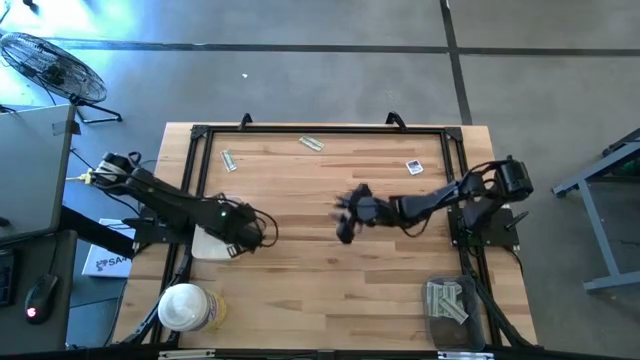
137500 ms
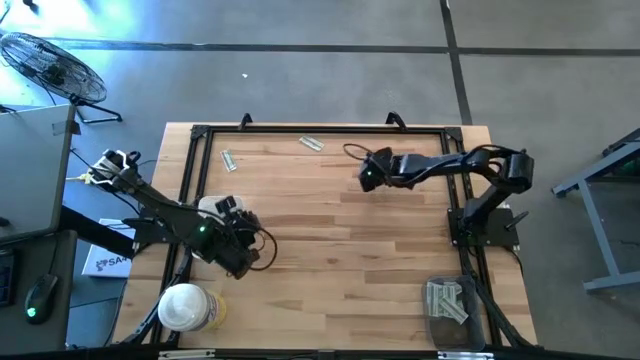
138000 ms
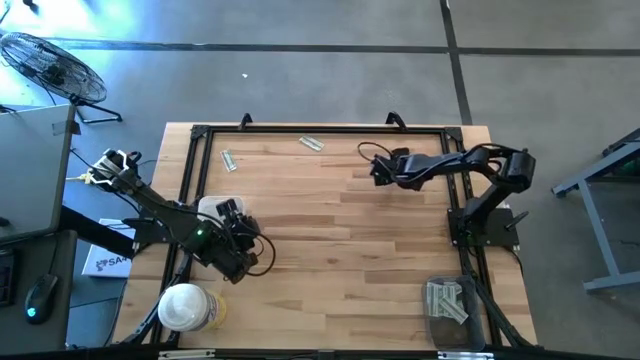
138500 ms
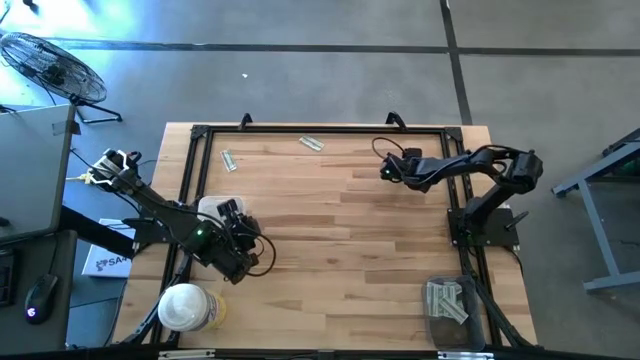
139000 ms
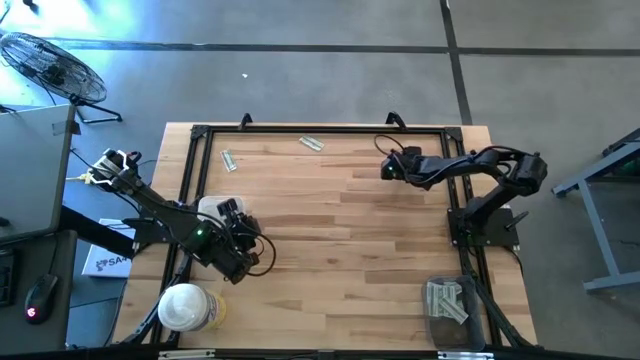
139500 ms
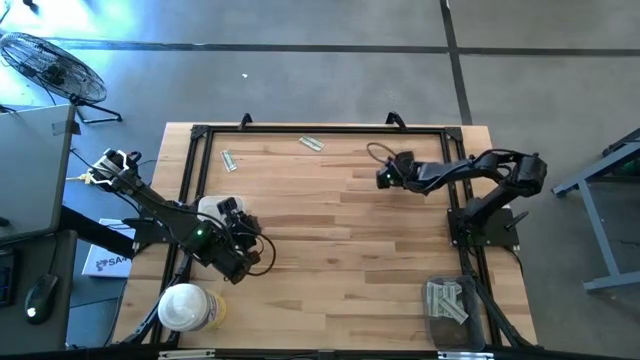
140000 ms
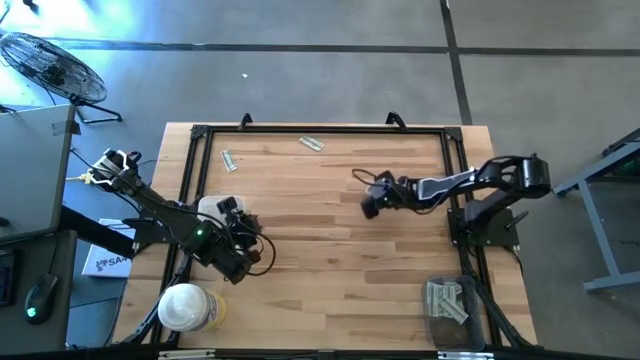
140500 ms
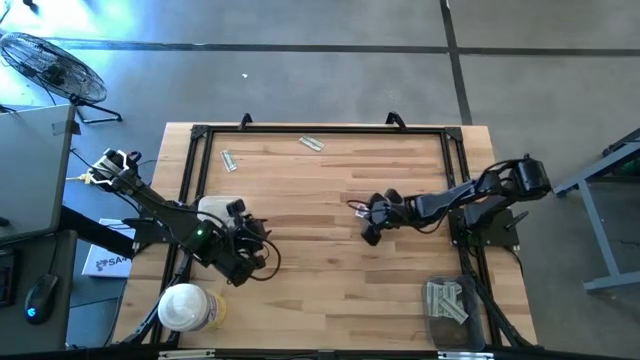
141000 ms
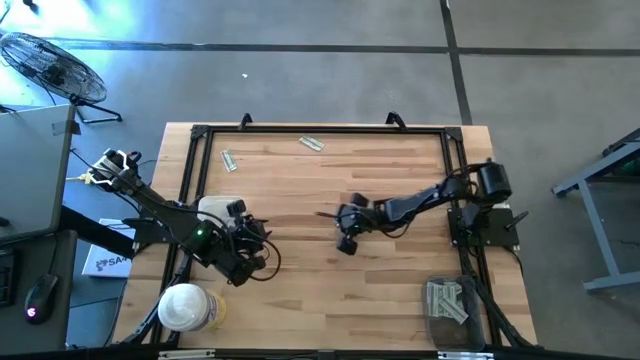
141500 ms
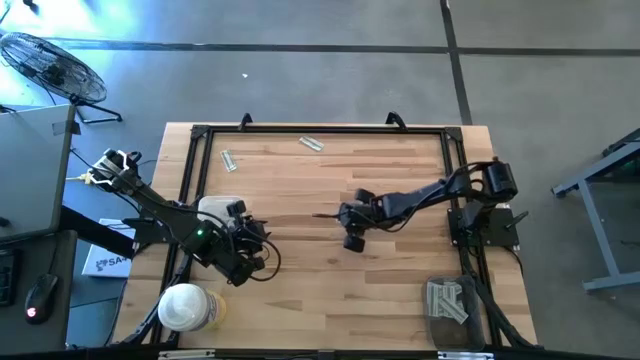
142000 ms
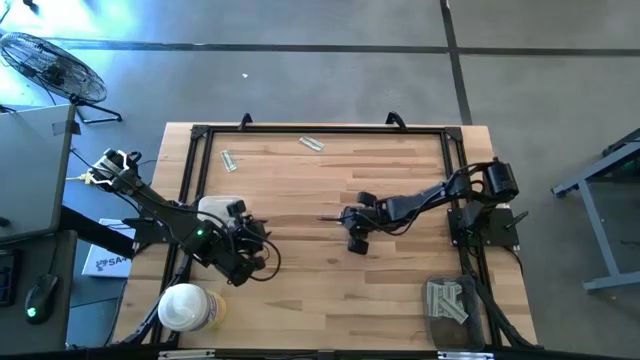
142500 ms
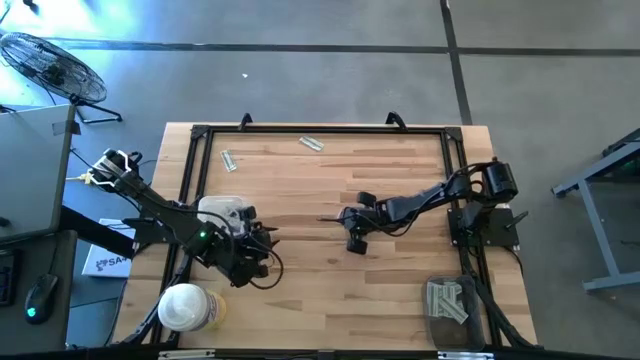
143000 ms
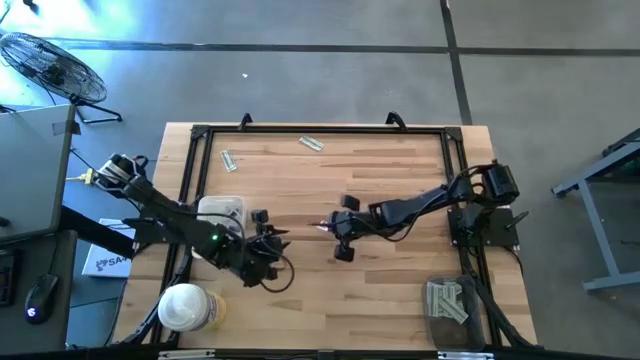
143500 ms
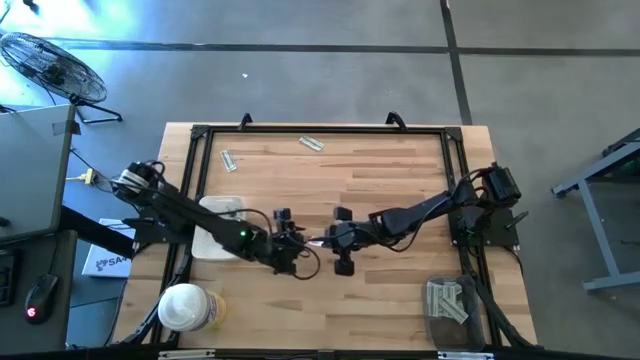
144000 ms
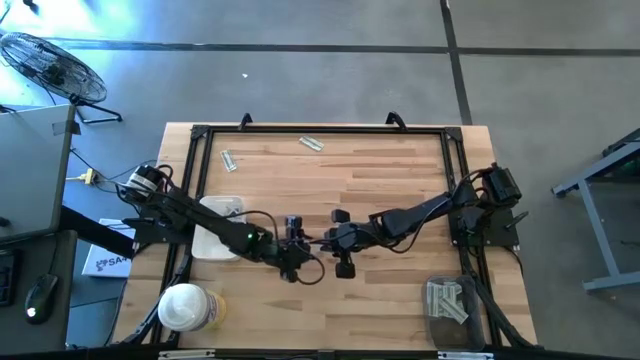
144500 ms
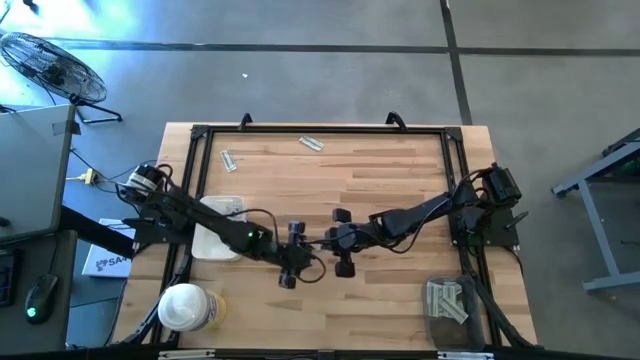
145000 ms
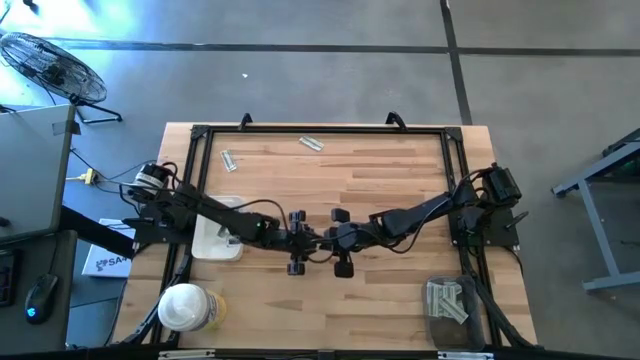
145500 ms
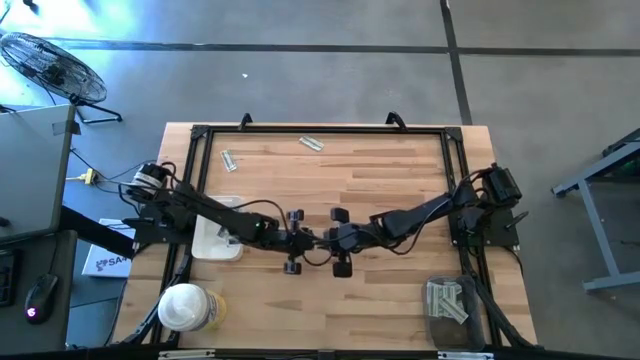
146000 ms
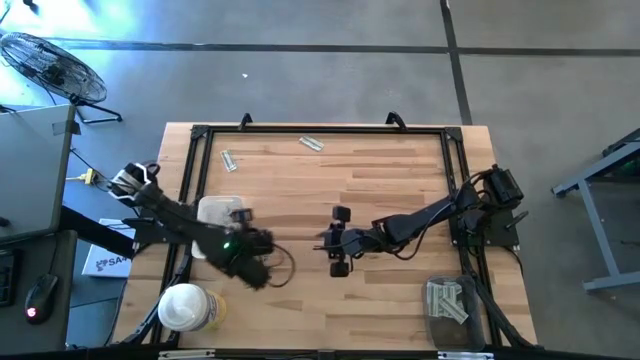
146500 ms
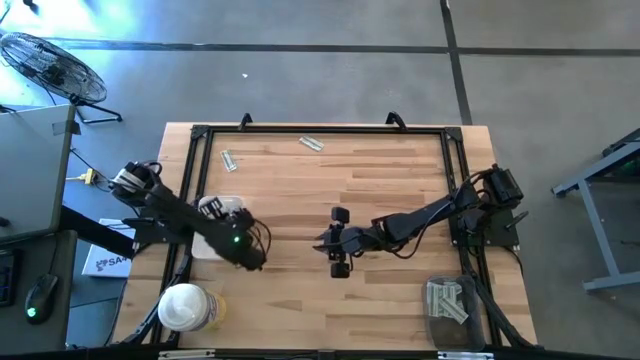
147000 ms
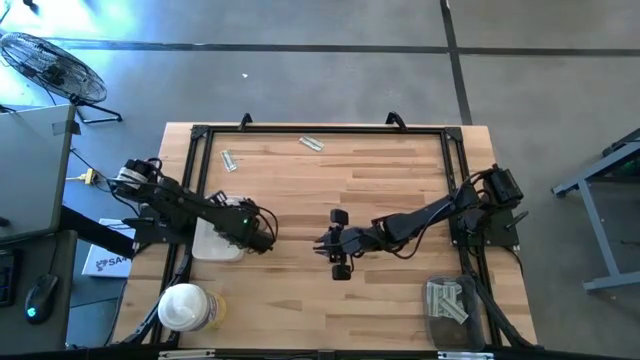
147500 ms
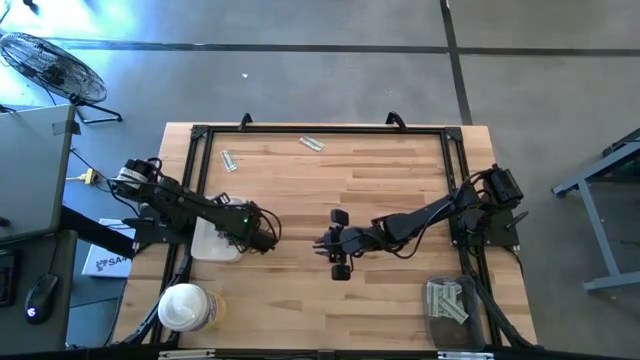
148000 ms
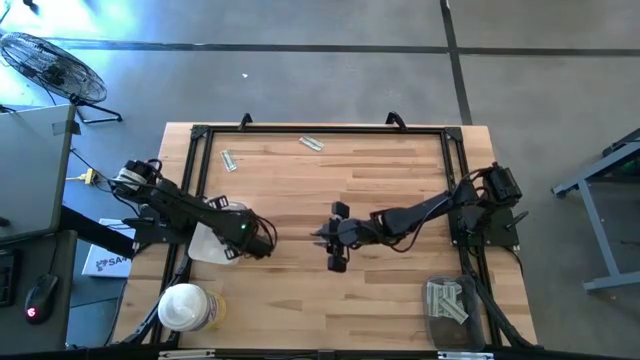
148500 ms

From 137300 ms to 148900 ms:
Task: Pick & Place First Aid Supplies
Put the blue alcohol pad into the white bin

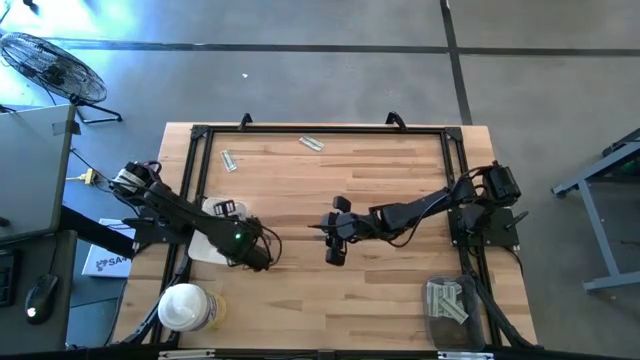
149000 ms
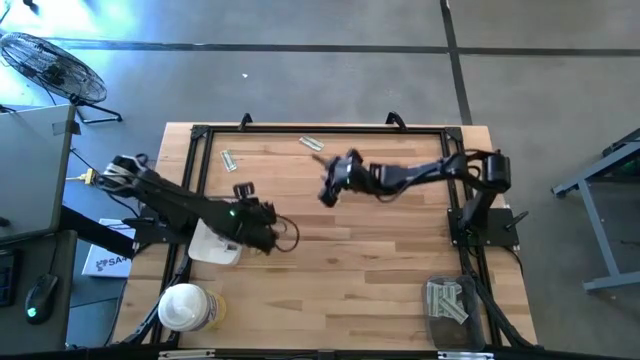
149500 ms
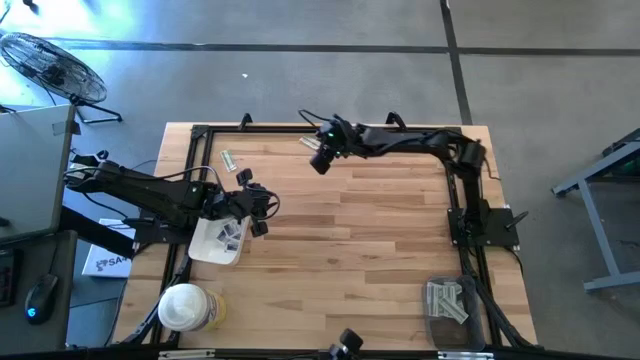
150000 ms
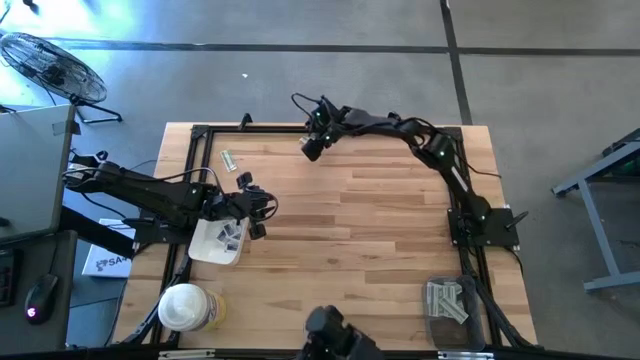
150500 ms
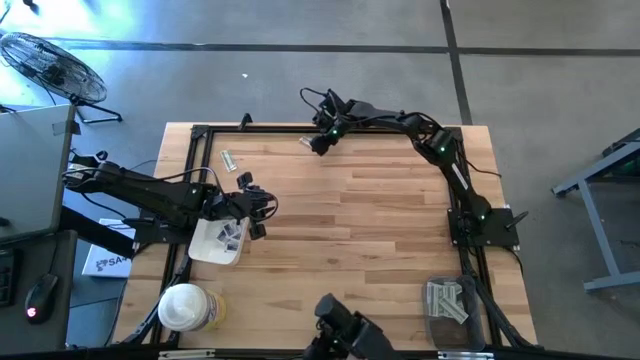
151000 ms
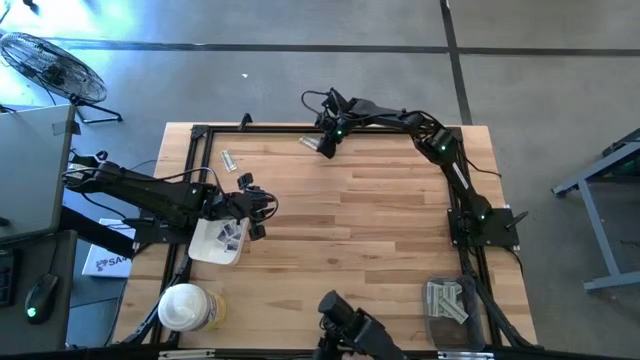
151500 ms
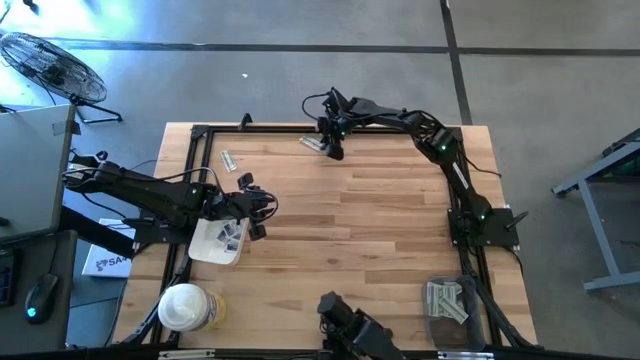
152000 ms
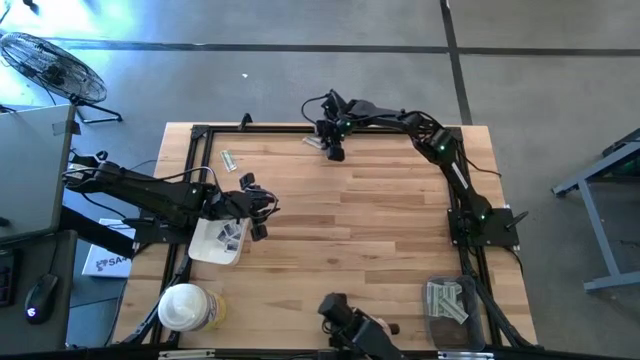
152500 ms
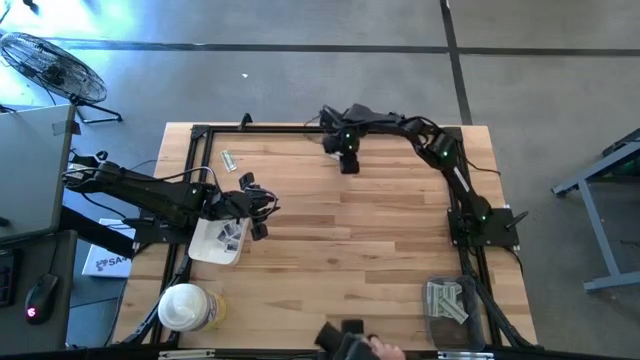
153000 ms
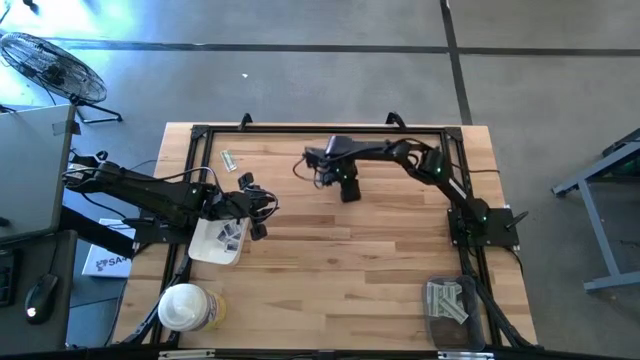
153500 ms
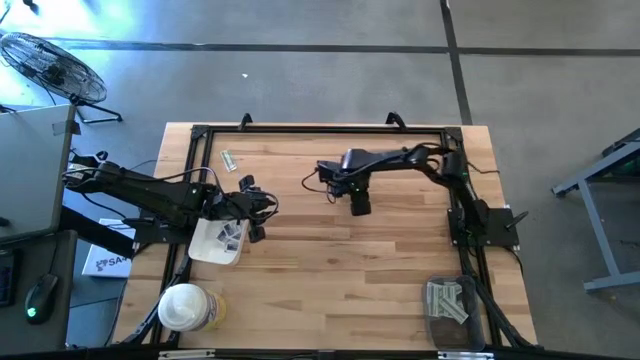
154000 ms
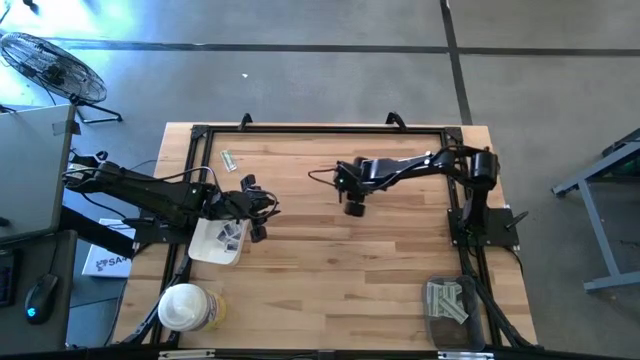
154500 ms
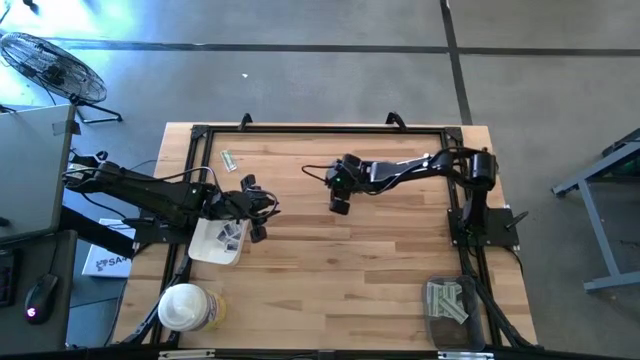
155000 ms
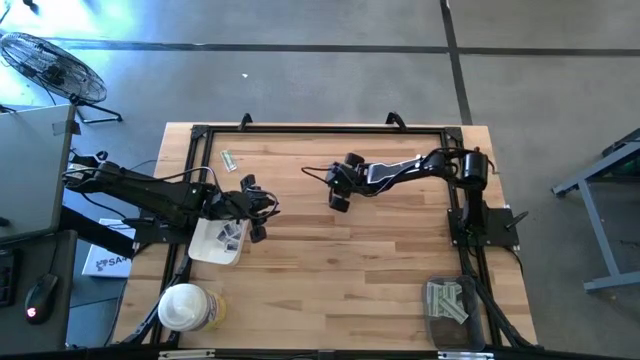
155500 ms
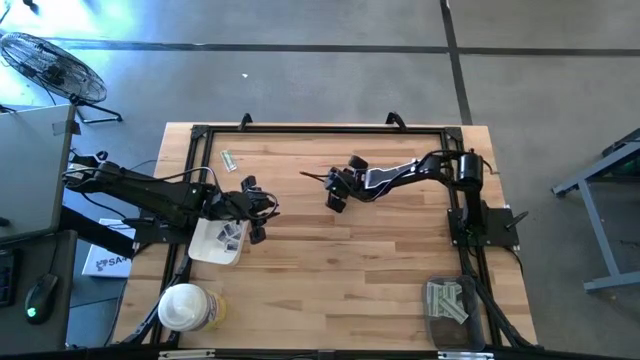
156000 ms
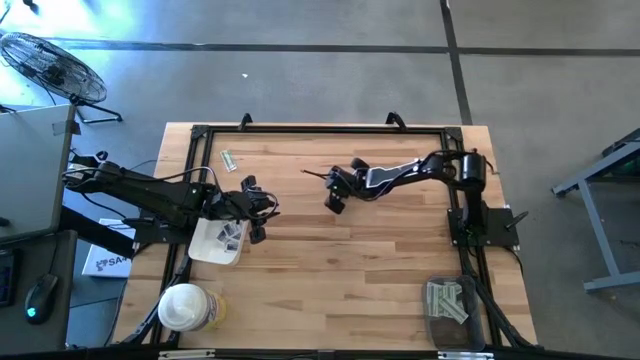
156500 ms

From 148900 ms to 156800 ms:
Put the green bandage pack into the black bin
